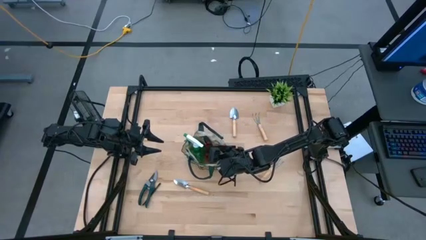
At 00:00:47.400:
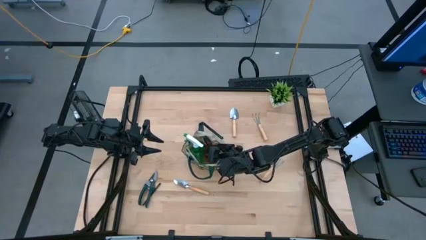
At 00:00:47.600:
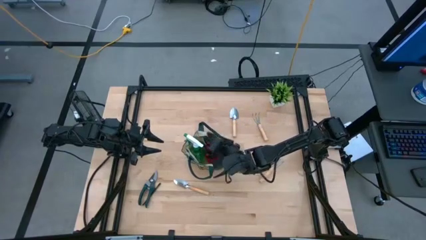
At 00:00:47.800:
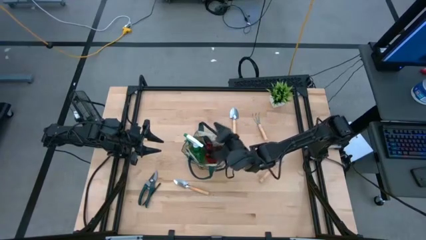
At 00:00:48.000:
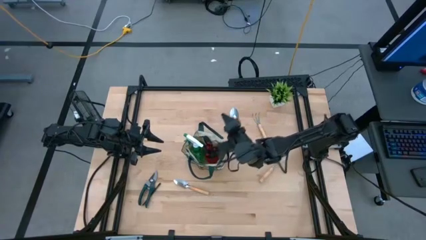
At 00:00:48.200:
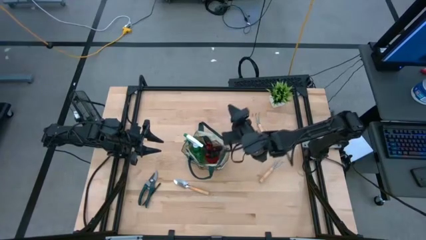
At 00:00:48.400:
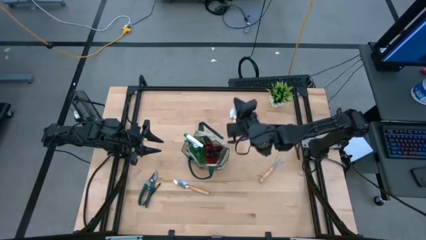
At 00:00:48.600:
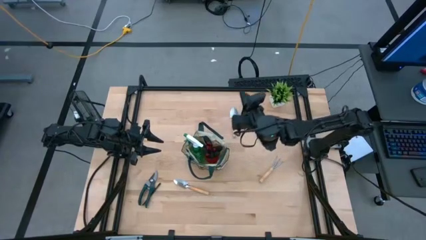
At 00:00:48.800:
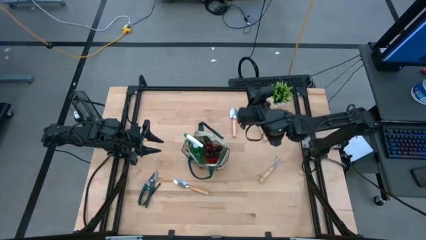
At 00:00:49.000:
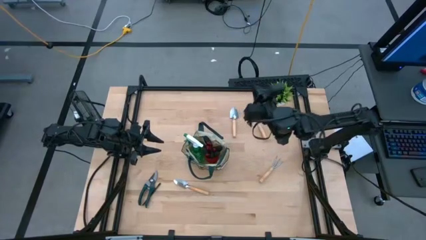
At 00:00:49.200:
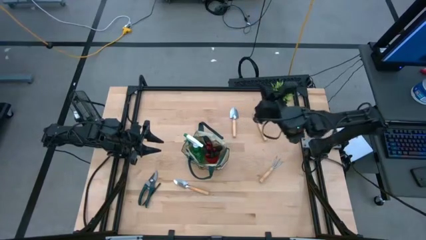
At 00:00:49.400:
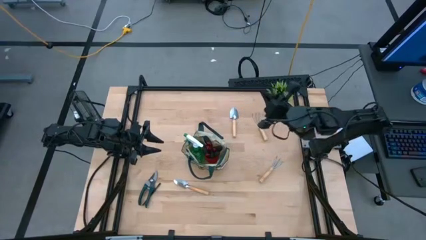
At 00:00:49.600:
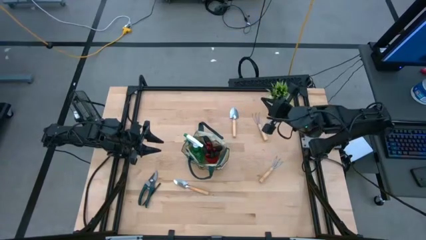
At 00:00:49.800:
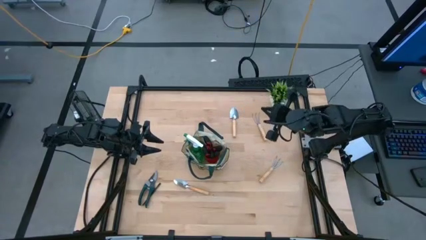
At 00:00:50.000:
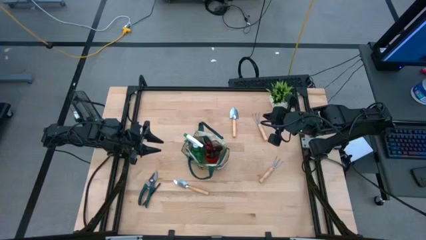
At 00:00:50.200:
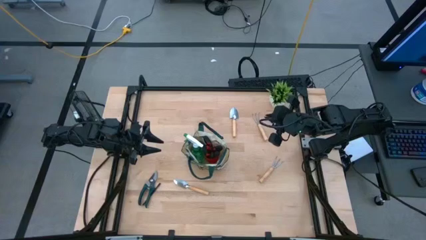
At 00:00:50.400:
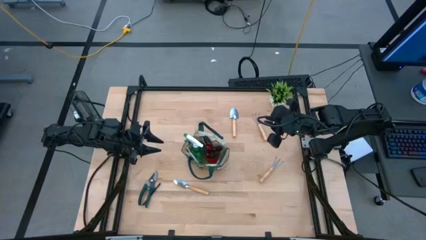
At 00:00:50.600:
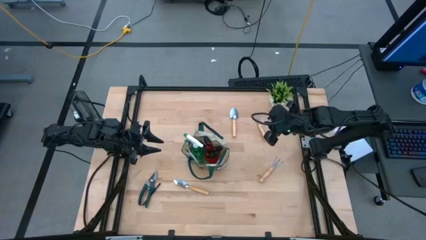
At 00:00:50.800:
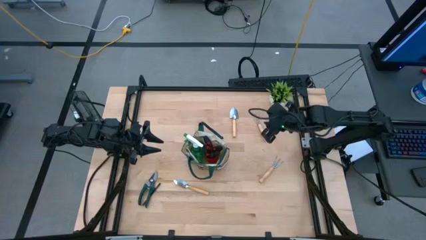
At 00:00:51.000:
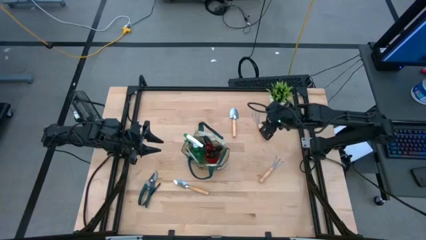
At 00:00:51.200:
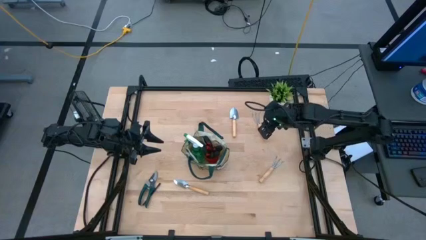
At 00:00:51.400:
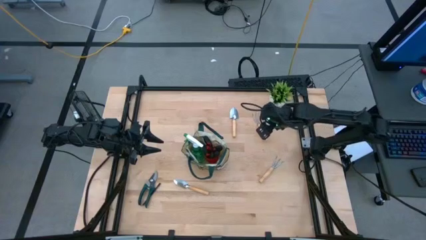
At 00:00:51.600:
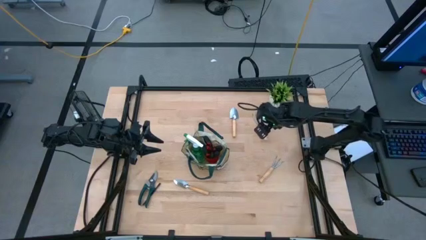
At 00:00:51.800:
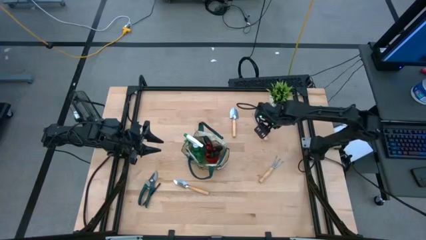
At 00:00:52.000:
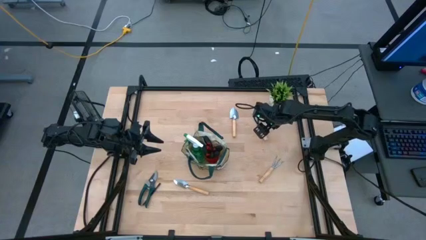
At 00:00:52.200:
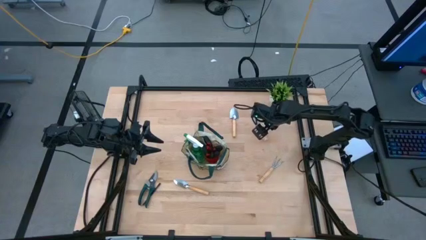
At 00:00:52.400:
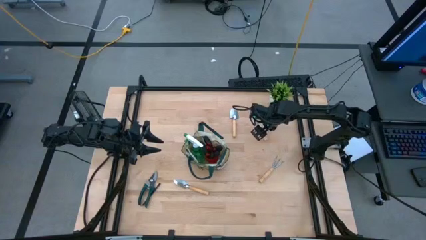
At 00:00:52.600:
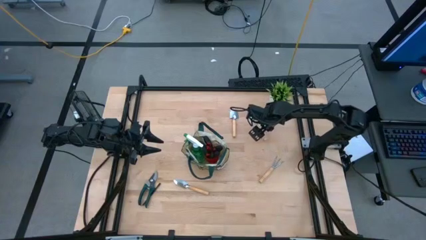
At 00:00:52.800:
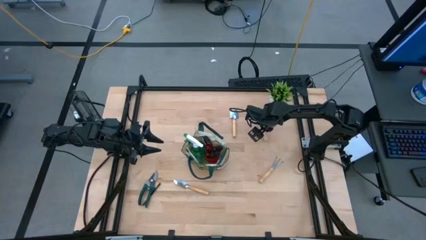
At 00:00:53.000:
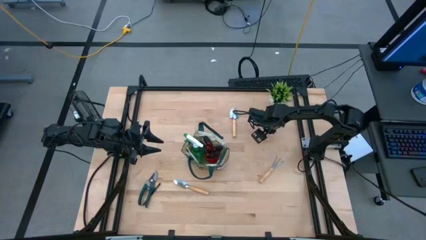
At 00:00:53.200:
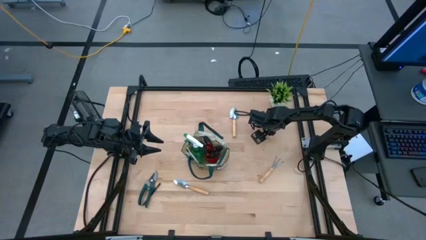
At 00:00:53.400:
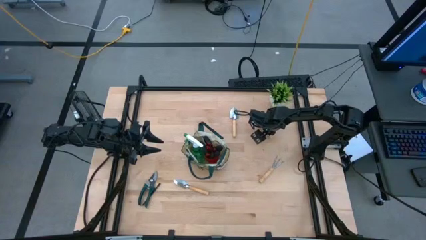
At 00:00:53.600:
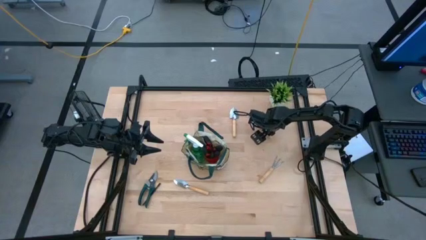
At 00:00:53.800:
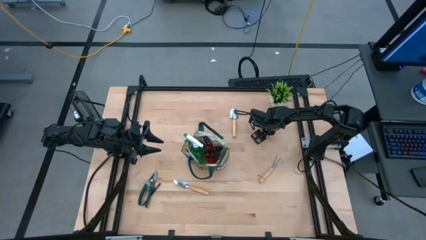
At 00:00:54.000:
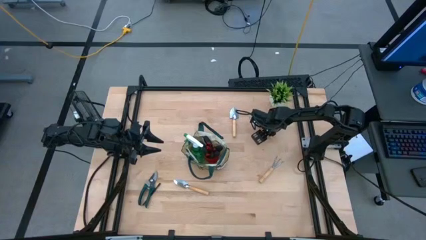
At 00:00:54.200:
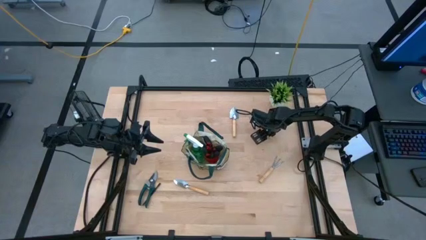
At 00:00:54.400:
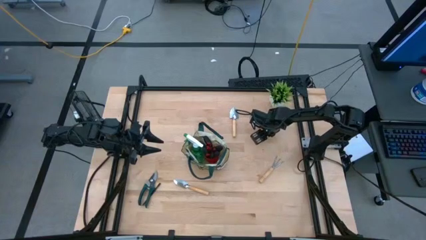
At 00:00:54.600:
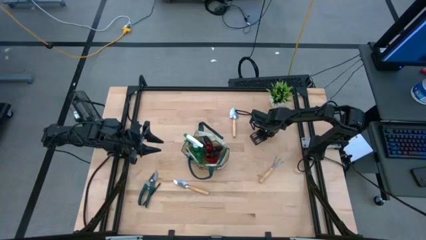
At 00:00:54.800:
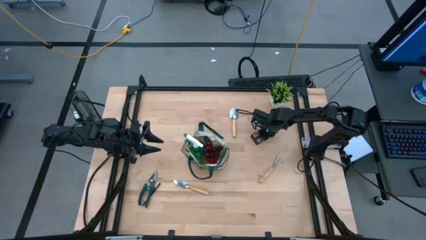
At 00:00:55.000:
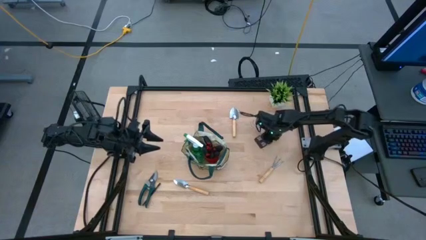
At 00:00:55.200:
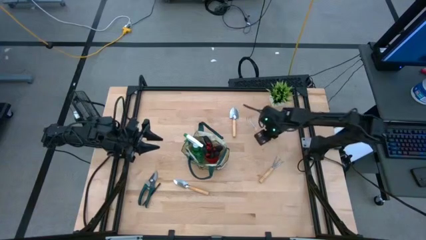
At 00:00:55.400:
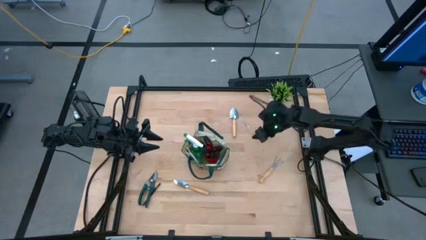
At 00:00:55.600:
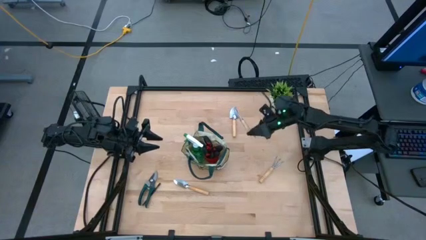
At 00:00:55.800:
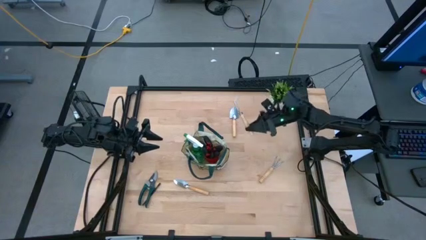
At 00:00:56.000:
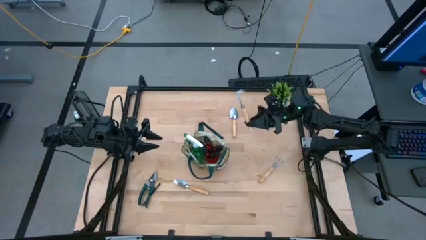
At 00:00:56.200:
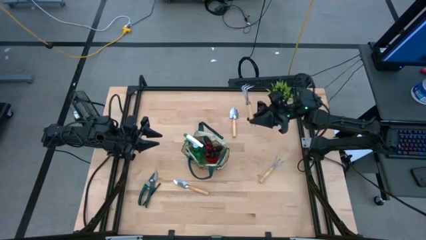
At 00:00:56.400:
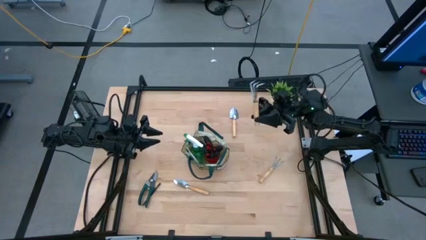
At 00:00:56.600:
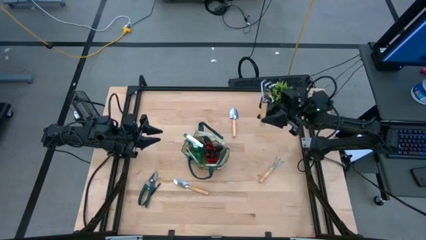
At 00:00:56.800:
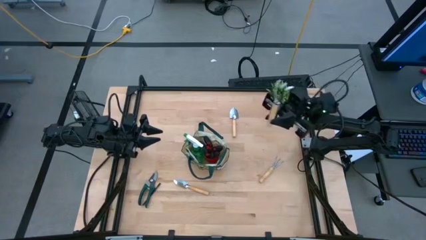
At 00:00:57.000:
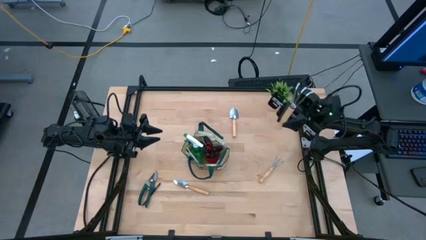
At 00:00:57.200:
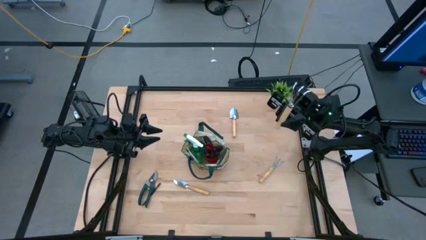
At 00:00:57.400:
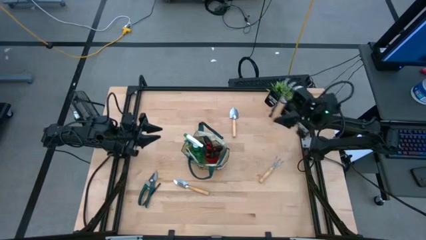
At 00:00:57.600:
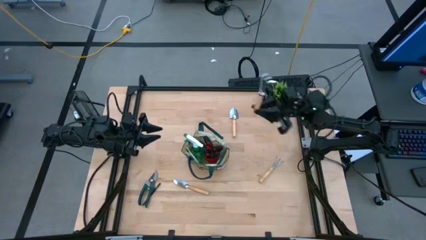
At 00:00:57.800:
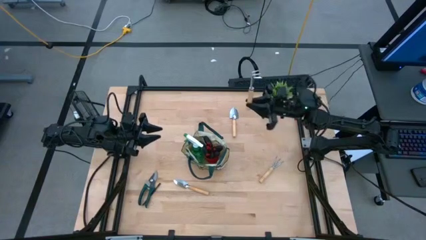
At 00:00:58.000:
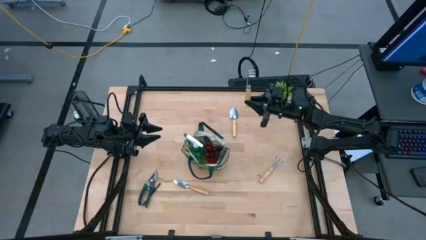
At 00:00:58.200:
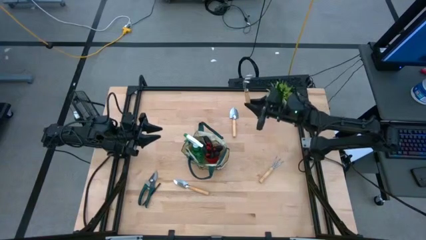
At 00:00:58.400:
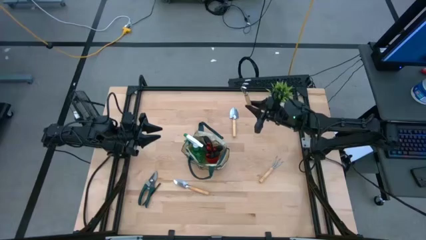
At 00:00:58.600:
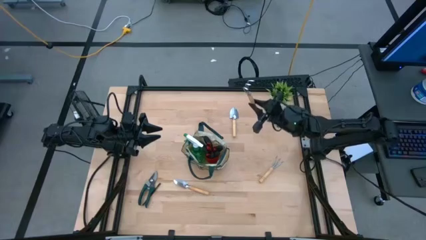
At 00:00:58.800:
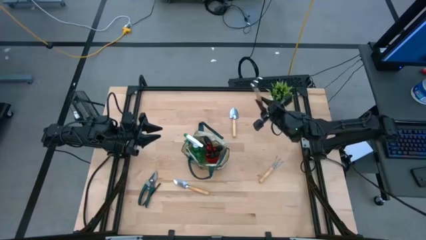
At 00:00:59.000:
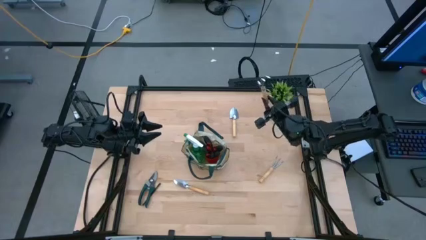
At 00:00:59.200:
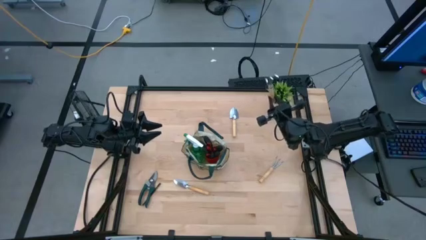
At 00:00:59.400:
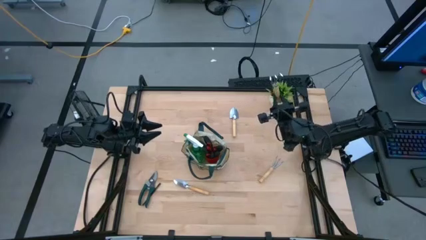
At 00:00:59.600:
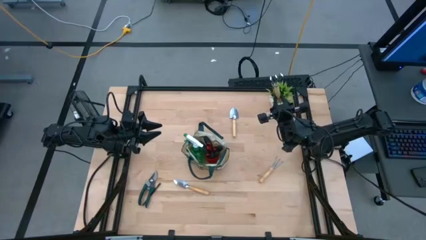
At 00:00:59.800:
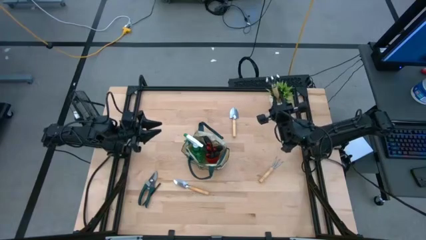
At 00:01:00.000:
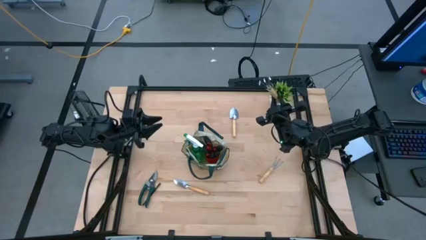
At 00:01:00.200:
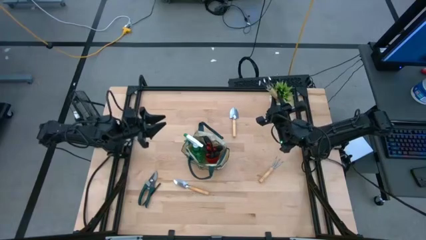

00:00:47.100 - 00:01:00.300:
Task: Pick & Place Garden tools in Gardening bag
Put the brown hand rake into the gardening bag
